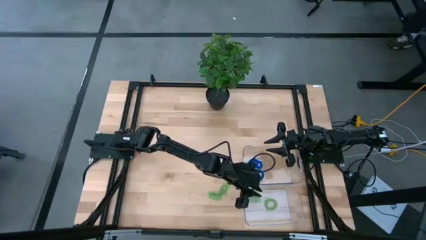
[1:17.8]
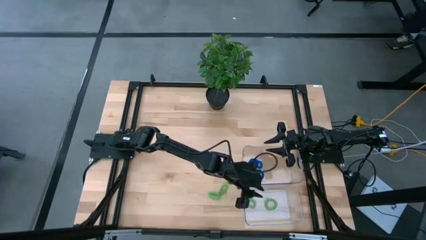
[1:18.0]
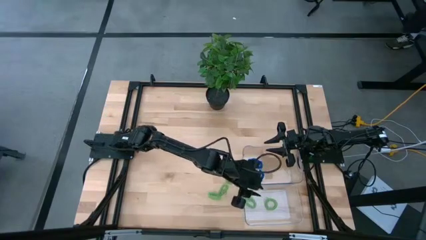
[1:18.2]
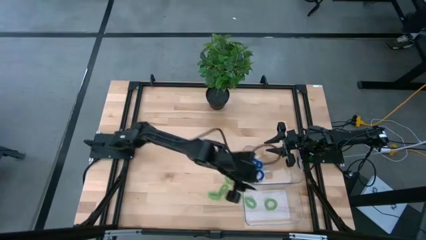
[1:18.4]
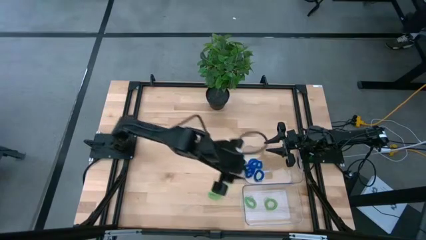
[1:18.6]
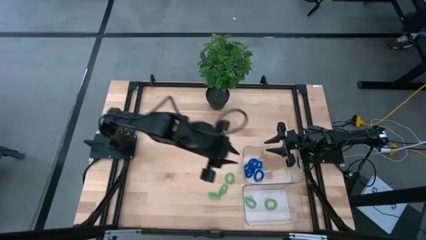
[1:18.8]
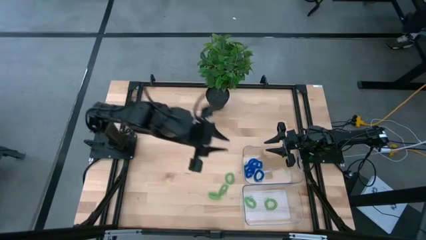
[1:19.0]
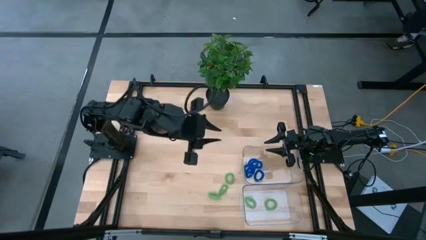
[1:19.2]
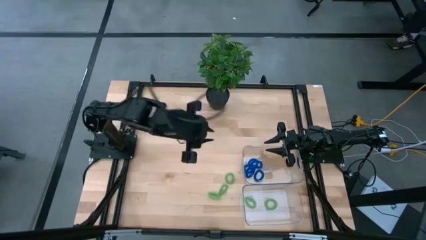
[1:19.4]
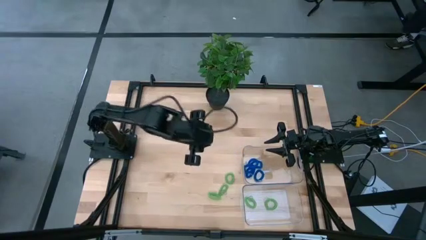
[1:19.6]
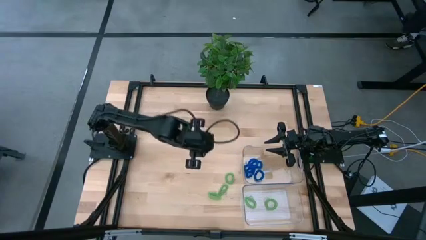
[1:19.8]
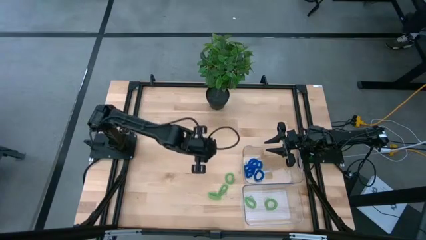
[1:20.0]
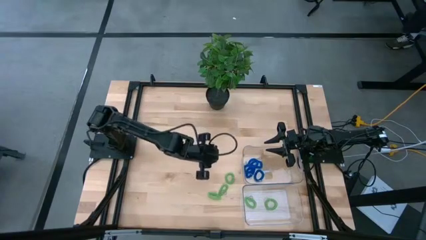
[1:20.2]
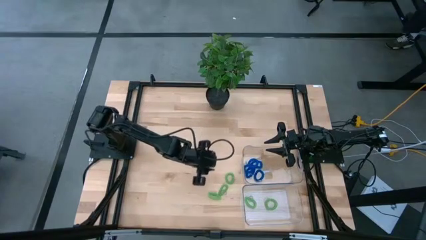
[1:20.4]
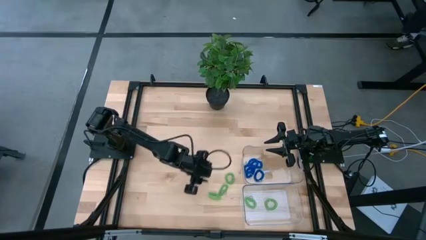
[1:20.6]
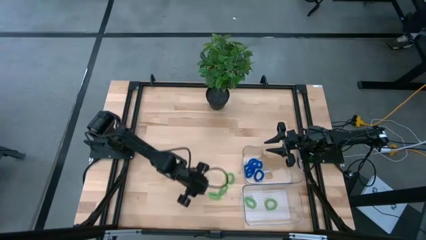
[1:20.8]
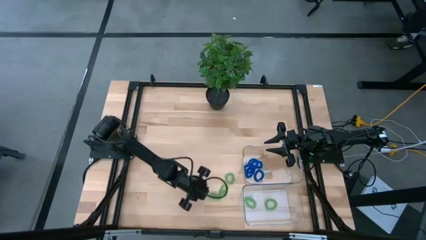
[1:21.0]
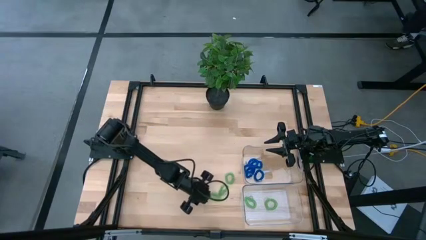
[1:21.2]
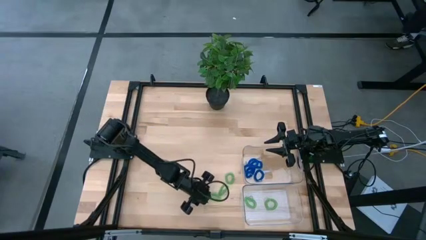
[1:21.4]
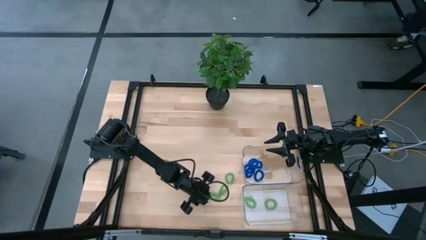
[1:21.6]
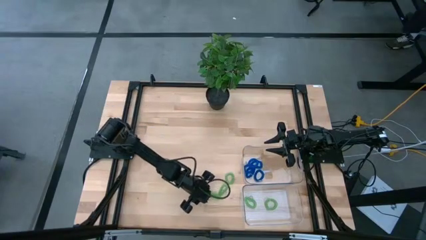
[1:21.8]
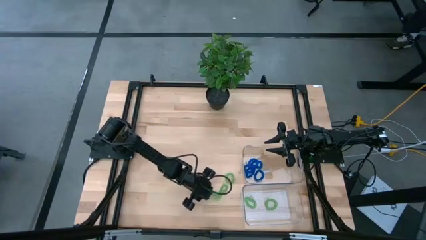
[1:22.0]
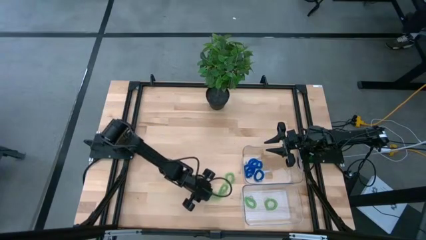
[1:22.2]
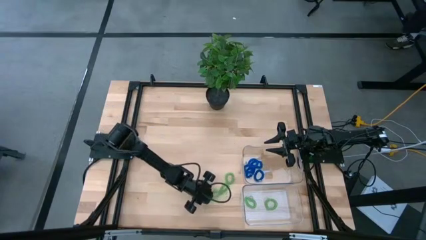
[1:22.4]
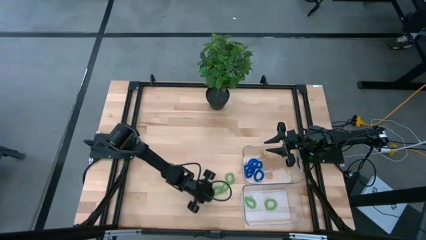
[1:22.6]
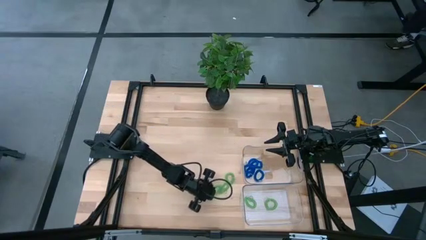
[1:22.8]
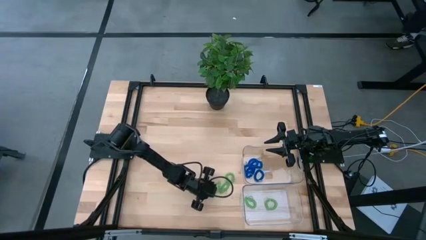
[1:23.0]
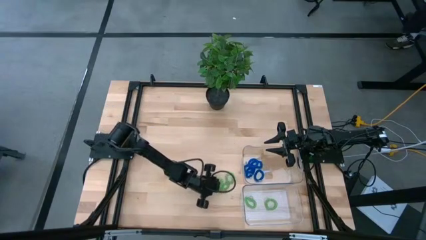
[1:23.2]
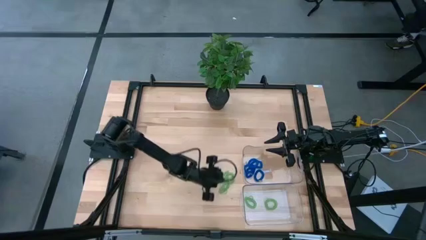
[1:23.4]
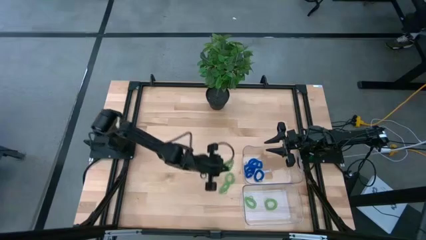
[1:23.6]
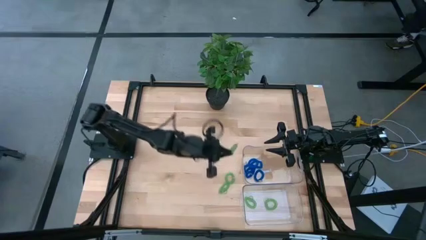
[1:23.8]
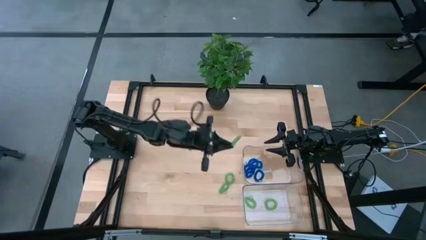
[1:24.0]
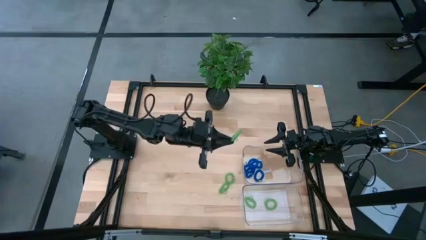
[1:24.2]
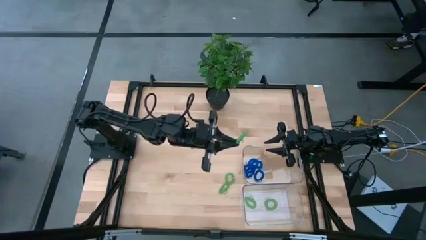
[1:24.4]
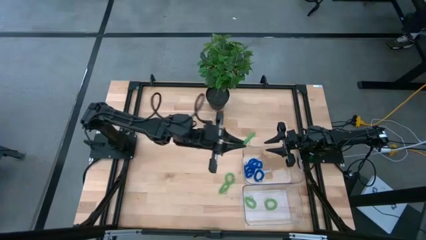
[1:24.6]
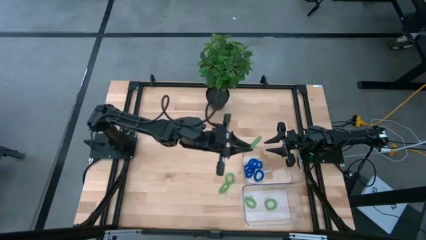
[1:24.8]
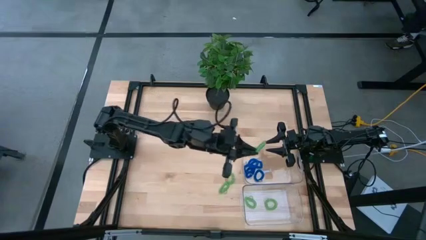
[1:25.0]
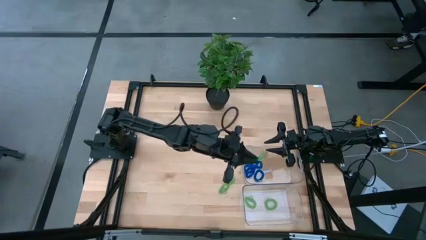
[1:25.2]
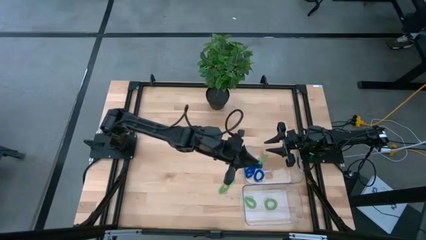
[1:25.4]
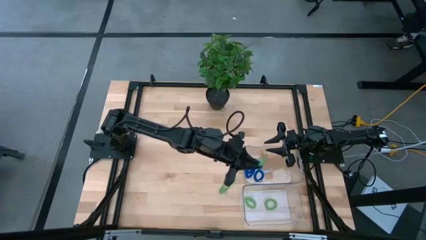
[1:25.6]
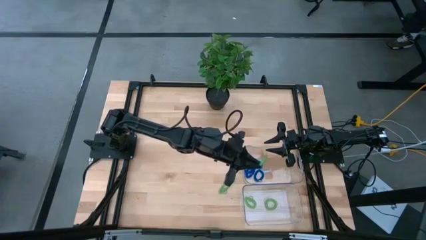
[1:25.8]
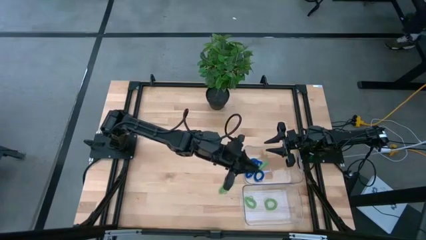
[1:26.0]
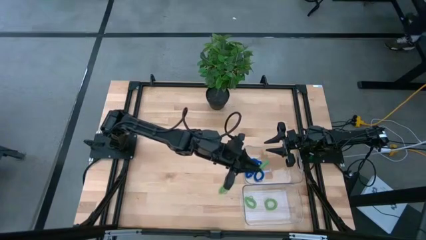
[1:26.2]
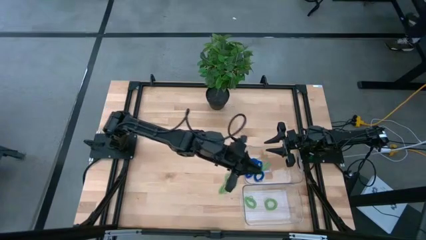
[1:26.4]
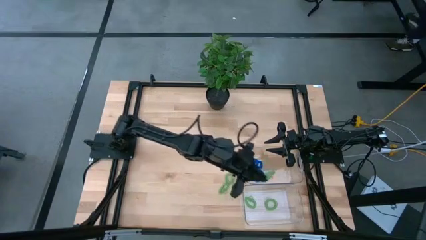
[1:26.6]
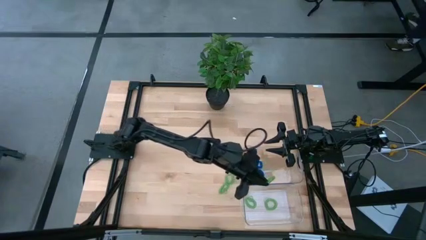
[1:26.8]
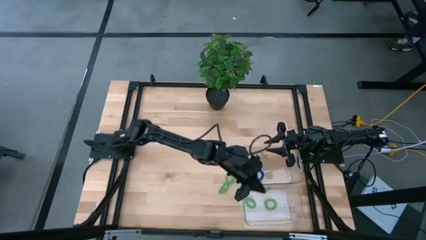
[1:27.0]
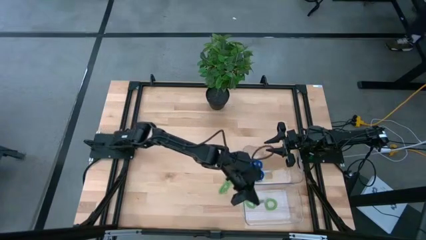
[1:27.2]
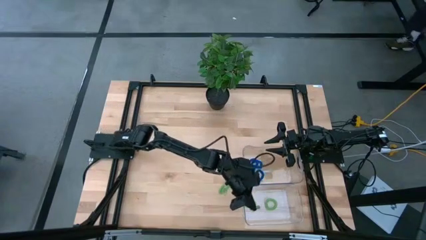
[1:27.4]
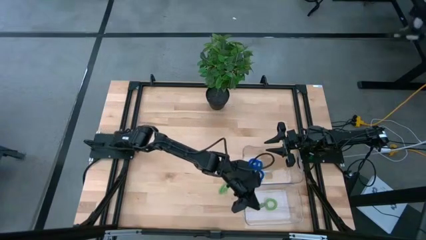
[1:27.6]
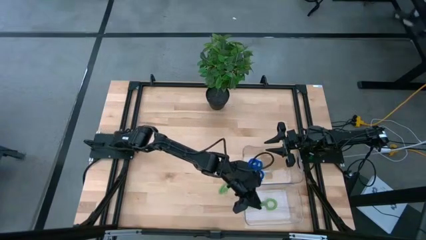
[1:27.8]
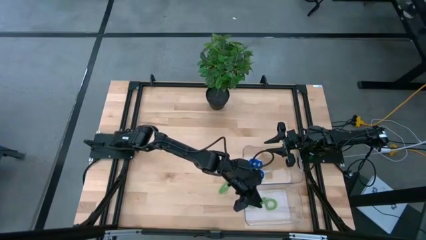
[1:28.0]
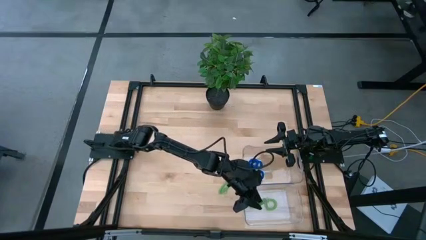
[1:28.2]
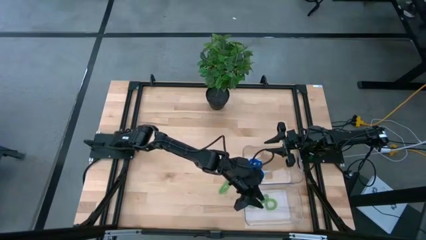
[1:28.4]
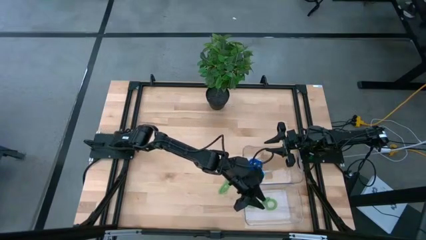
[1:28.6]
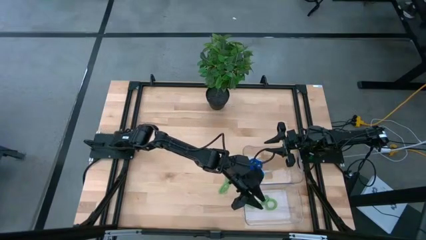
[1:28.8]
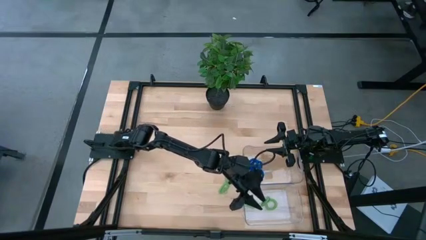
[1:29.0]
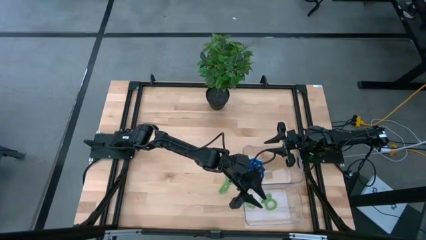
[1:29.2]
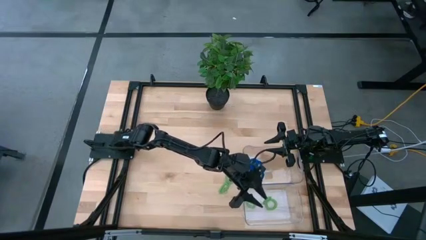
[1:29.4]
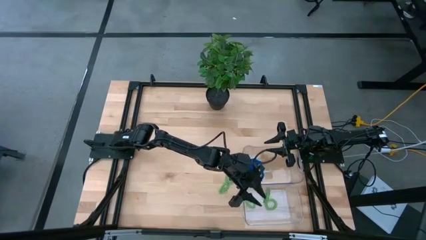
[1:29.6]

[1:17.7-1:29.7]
Task: Sort spring keychains
Put the green spring keychain in the bottom transparent bin
